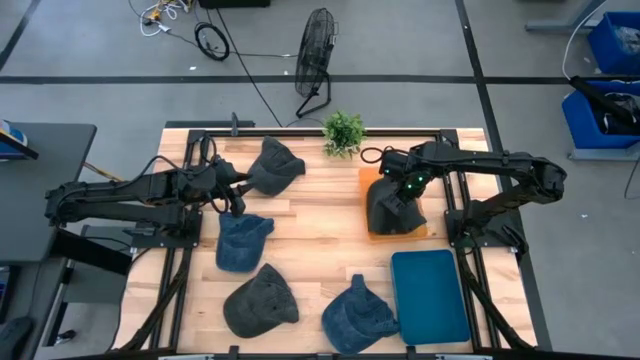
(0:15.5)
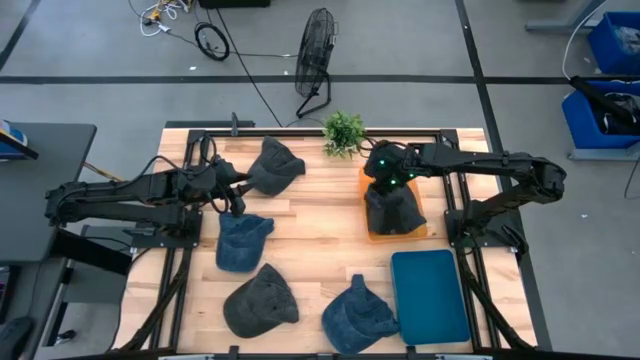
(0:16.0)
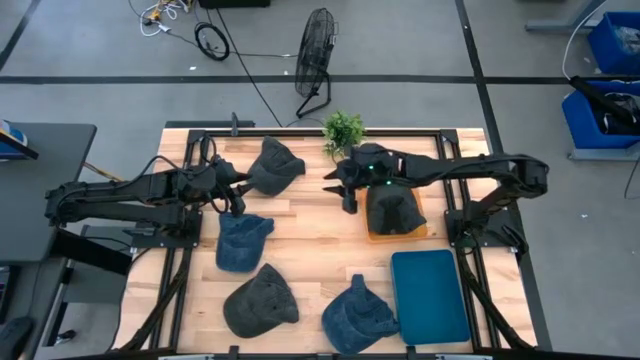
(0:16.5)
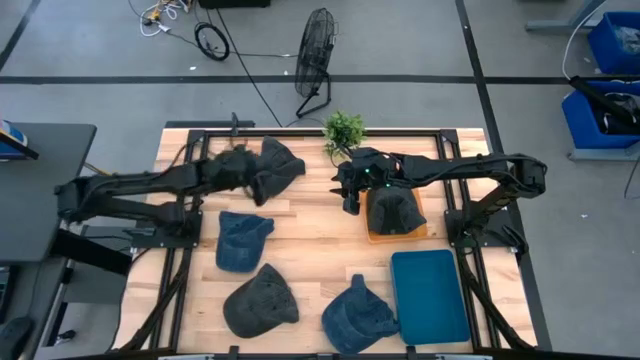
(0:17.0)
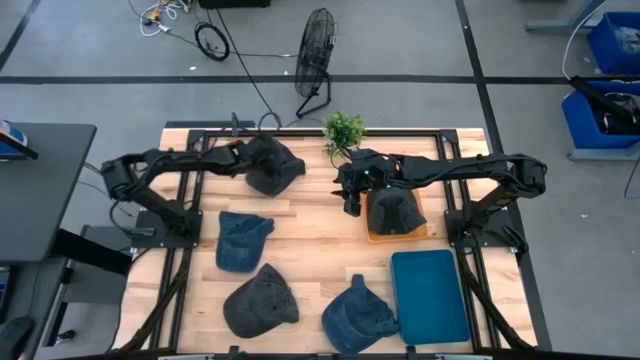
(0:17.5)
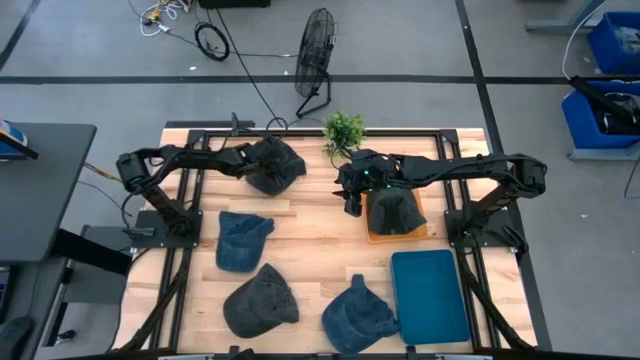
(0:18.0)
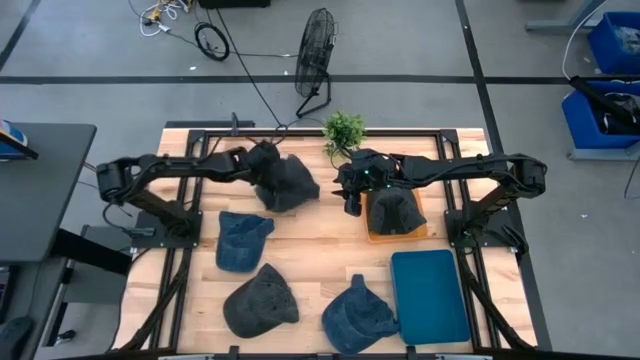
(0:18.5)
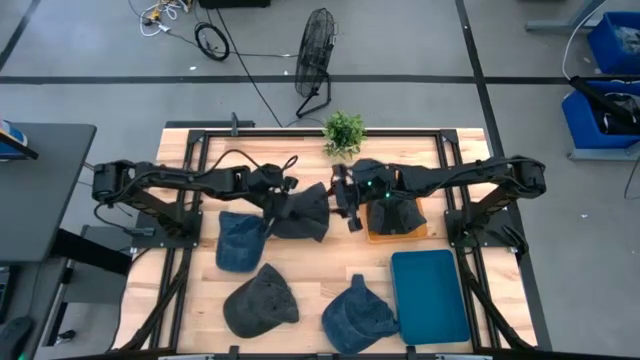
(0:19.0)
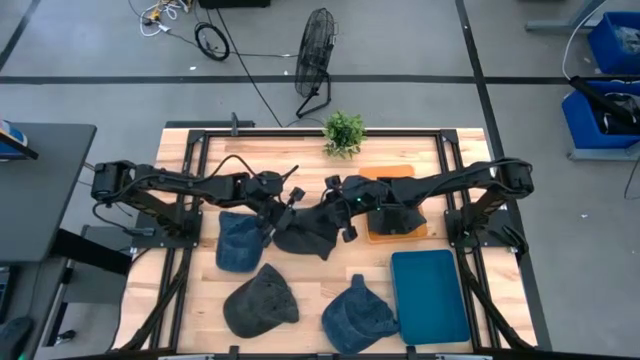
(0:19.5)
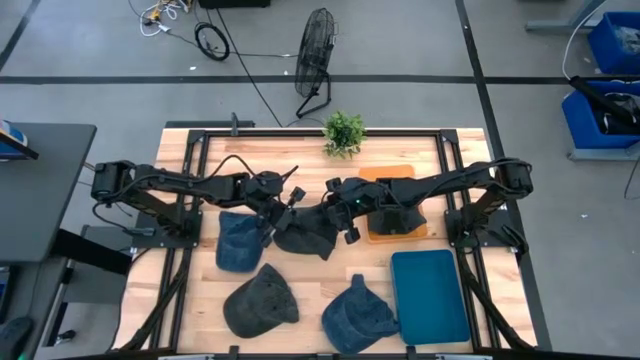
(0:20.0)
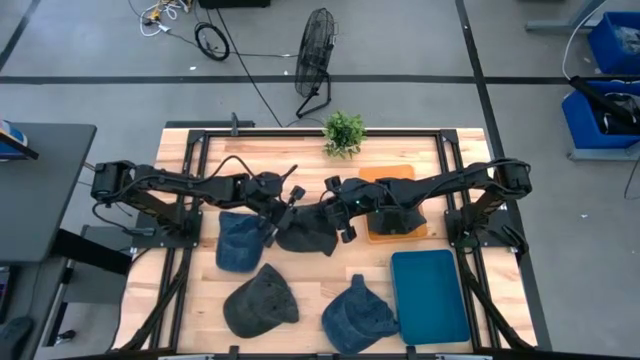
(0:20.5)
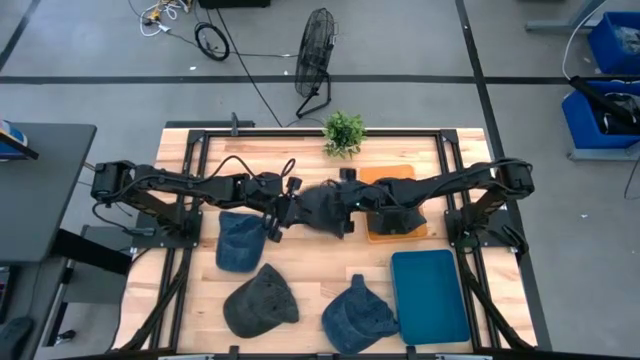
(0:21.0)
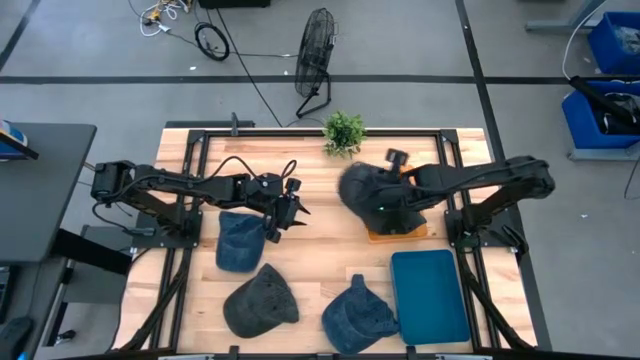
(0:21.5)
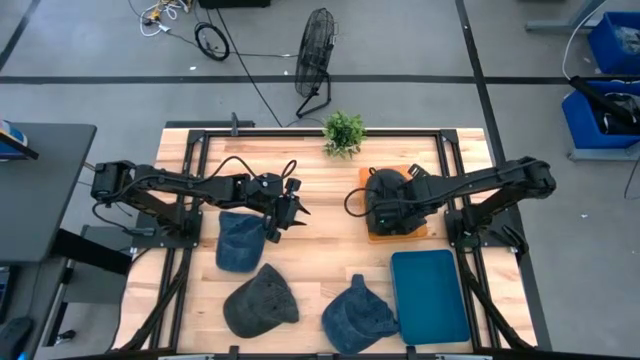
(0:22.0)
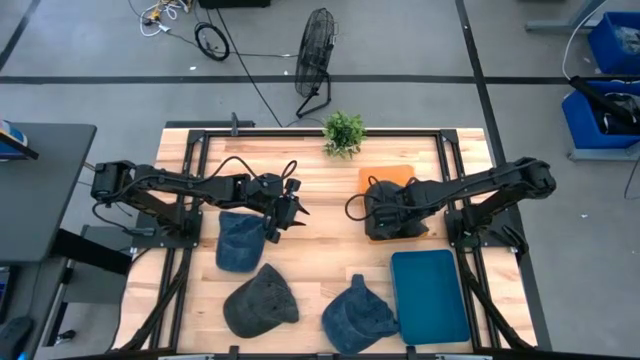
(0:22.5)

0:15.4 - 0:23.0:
Task: Pick & Place hat
Put the top black cap into the orange bin

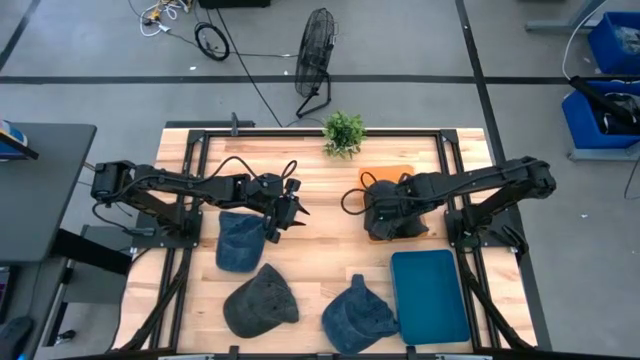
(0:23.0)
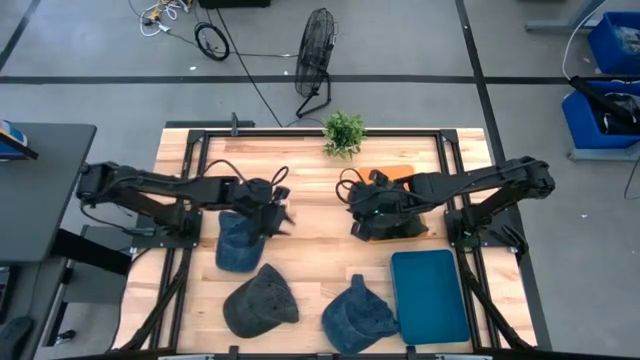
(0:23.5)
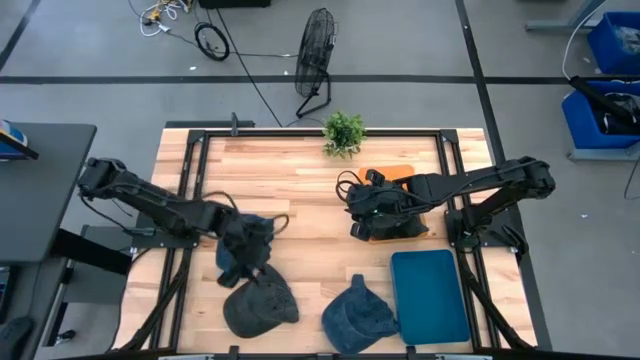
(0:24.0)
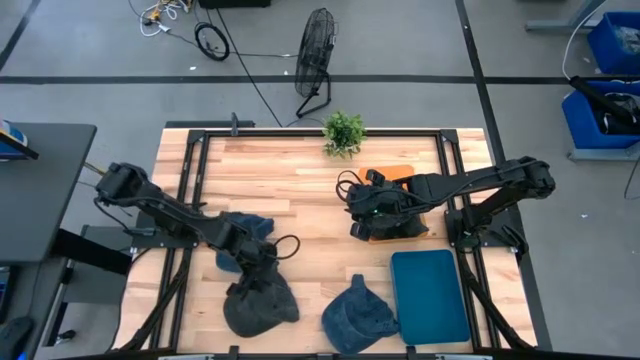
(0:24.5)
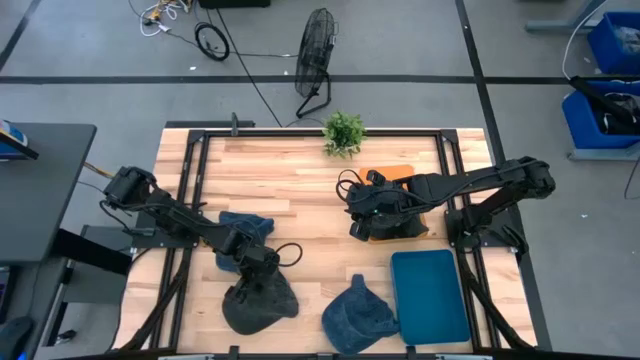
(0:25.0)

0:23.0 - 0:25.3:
Put the black cap into the orange bin

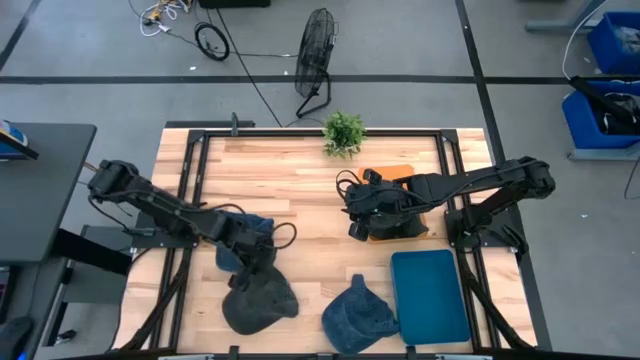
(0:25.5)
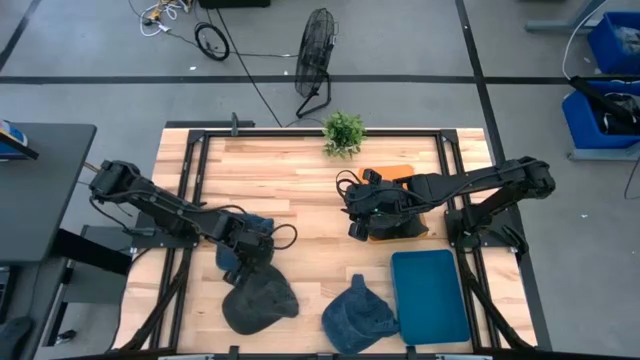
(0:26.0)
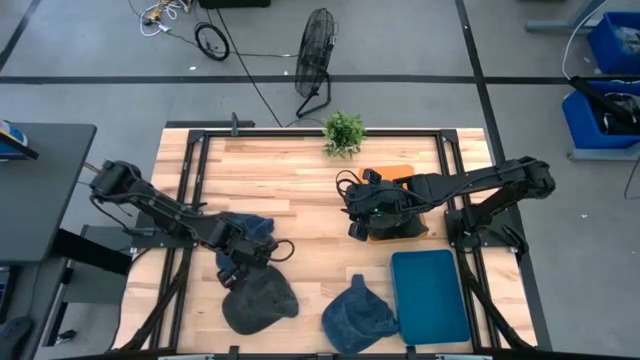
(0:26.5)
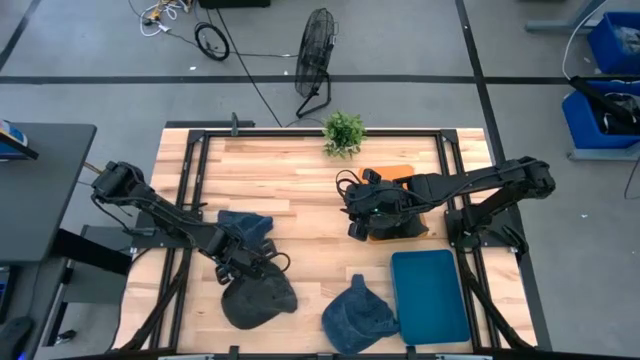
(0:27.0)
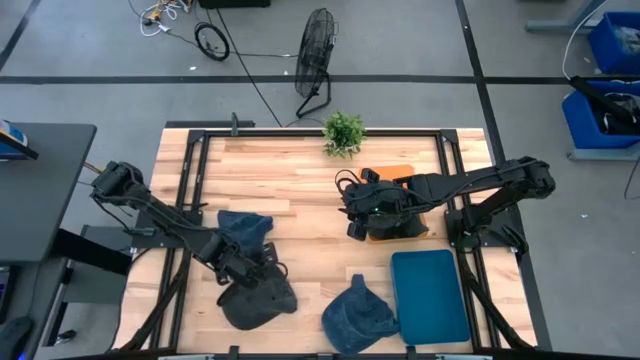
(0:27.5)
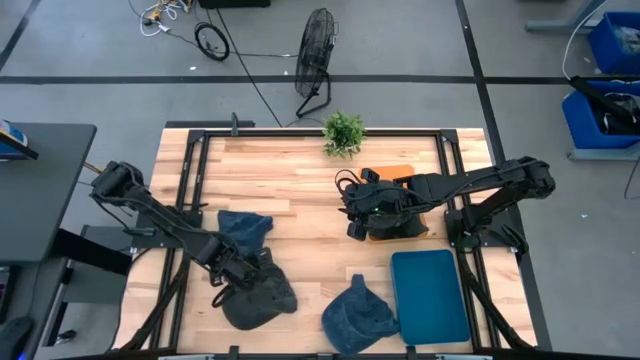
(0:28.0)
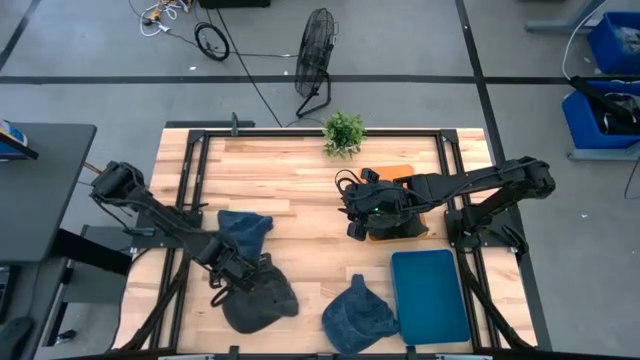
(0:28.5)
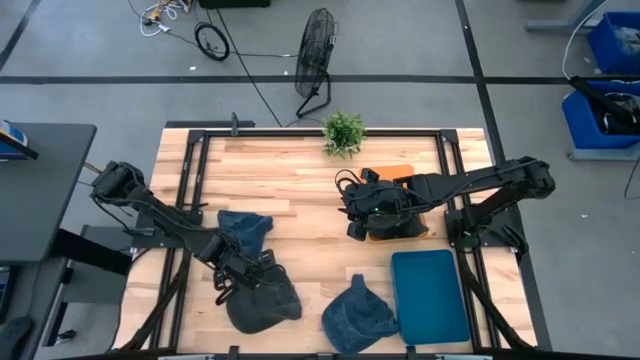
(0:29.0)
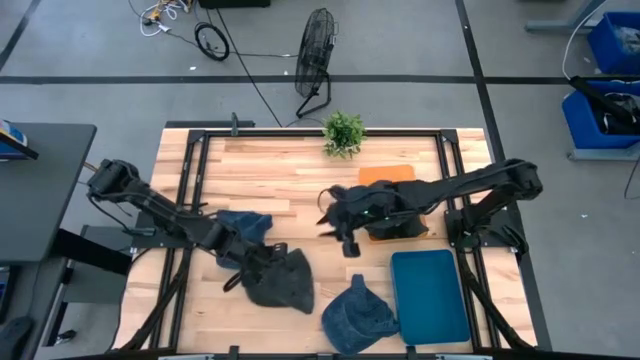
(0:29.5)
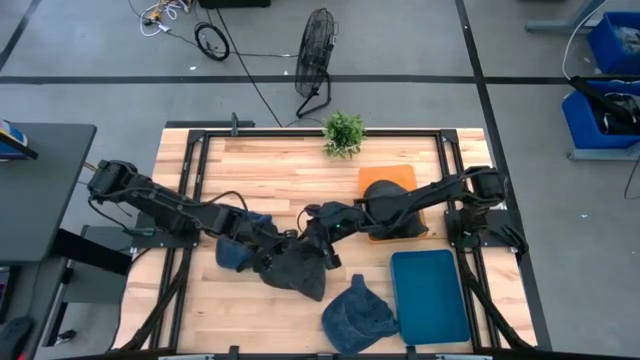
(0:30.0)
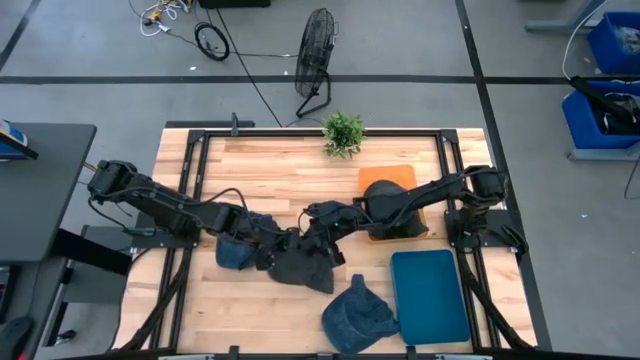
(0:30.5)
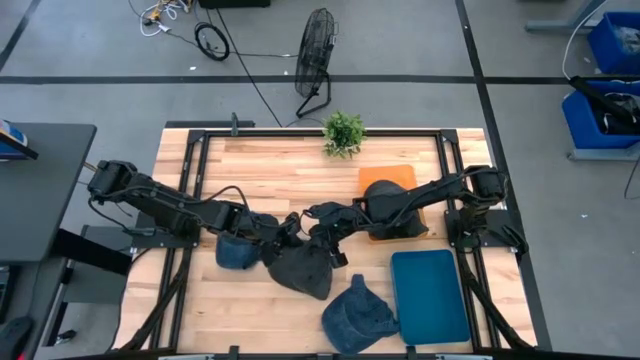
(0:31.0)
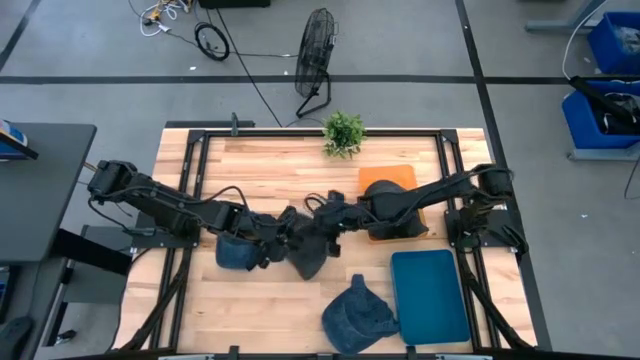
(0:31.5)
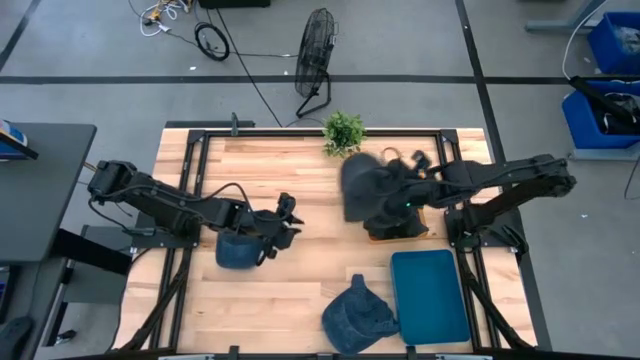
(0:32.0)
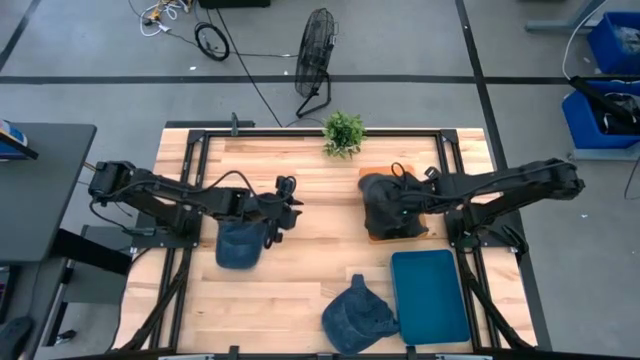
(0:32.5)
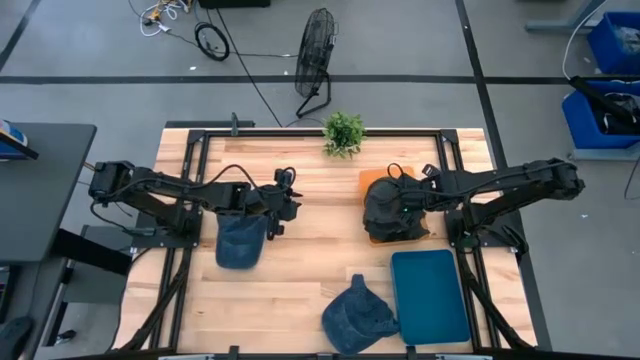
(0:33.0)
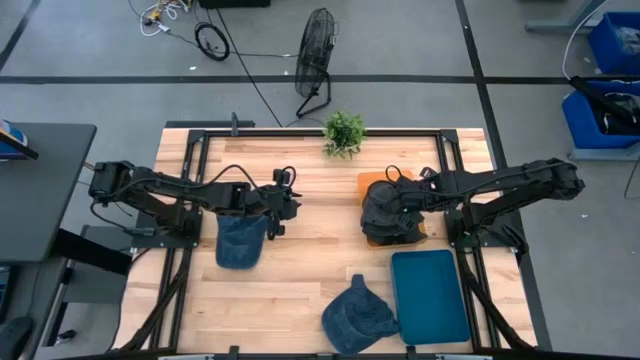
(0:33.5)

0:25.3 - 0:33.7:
Put the black cap into the orange bin

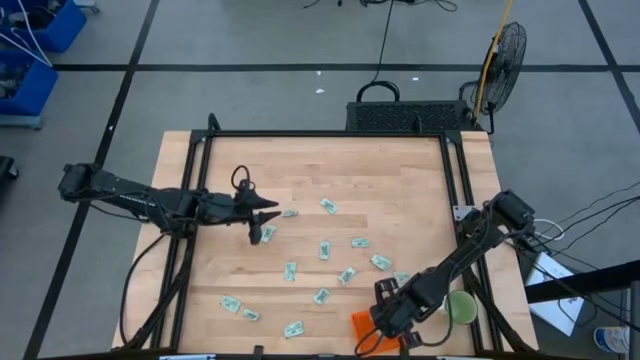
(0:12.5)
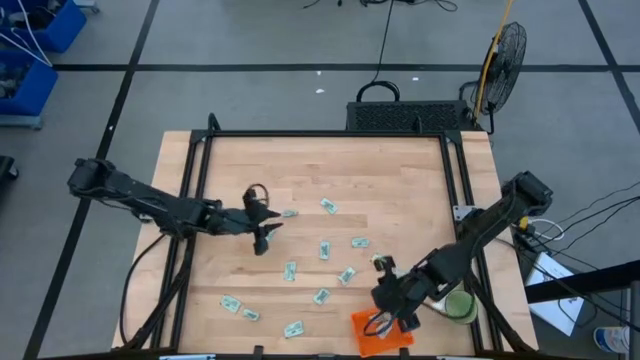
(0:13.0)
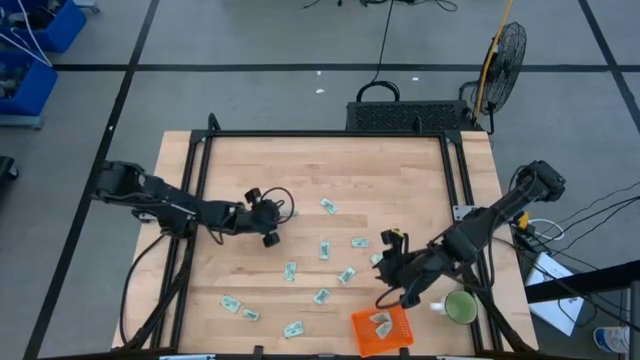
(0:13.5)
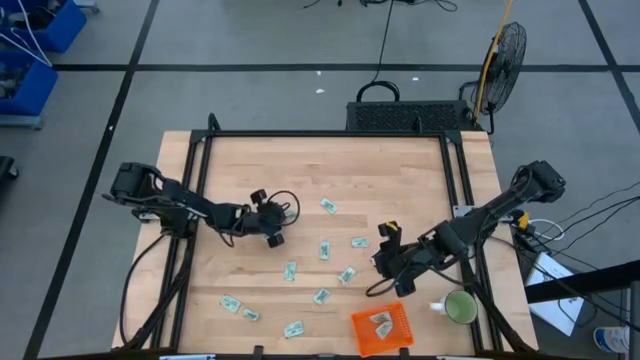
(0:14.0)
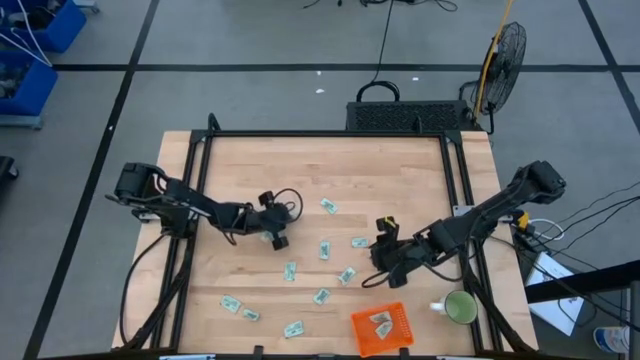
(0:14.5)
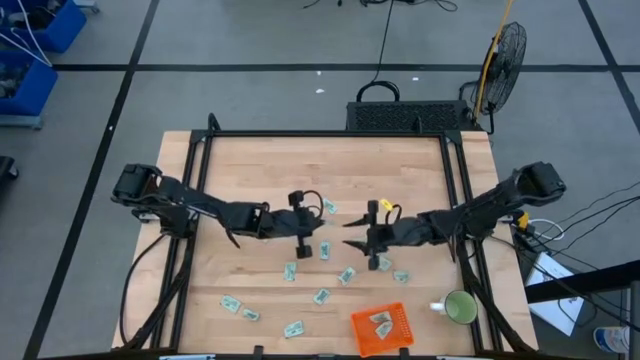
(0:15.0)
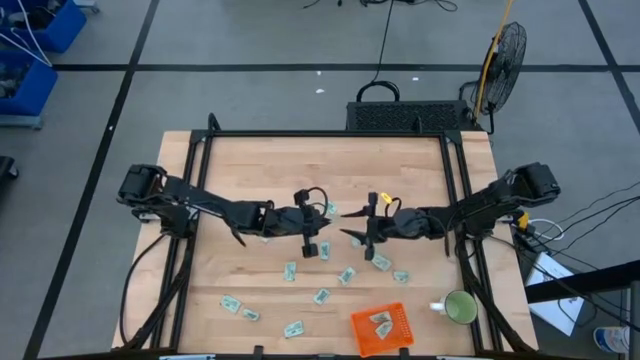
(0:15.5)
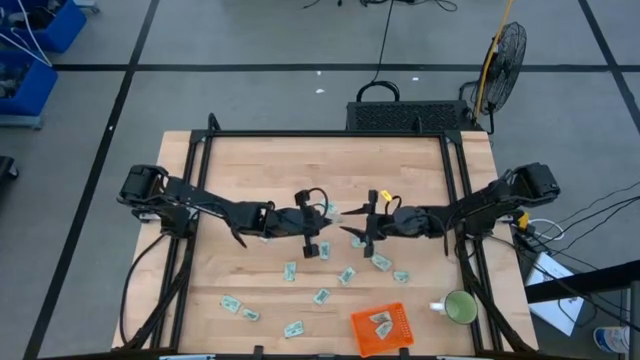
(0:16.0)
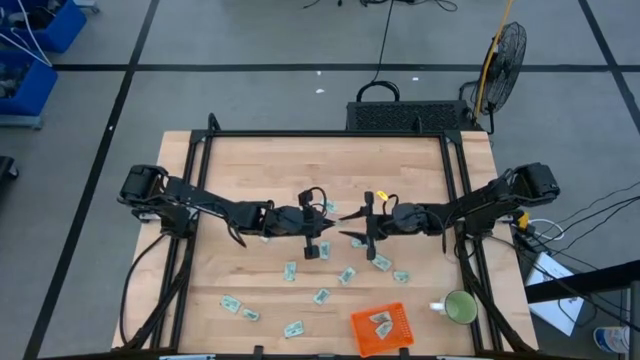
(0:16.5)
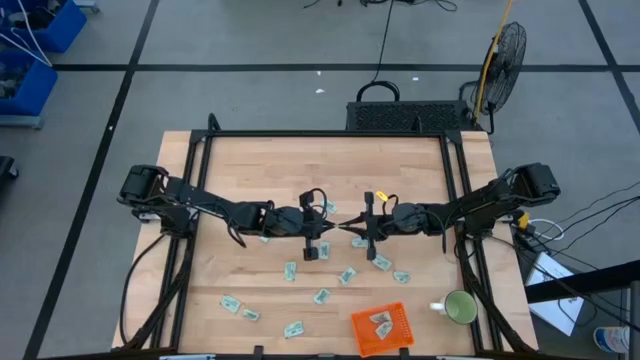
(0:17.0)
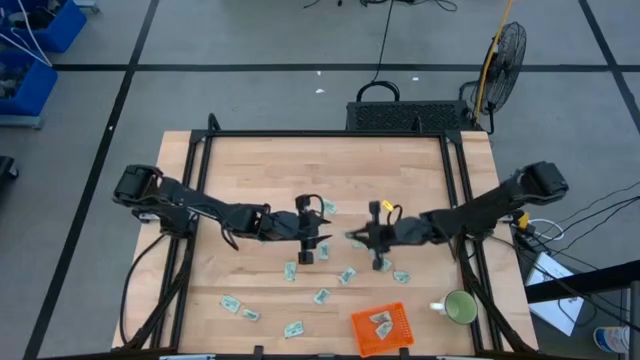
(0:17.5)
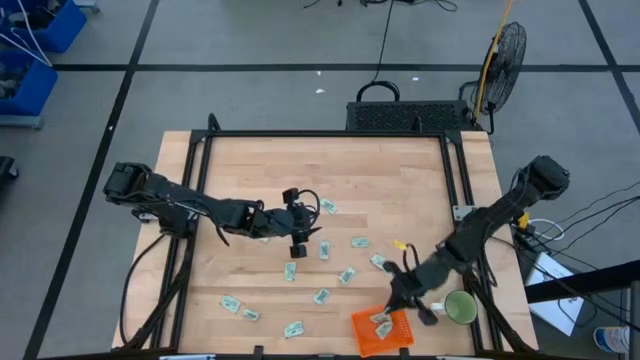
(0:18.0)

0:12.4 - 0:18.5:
Task: Pick and place Stevia / Truvia into bins
Put the stevia packet into the orange bin
